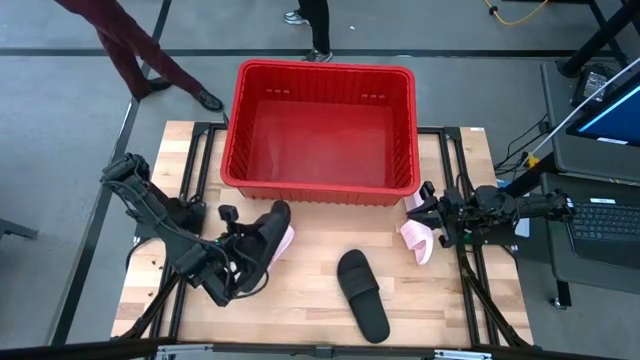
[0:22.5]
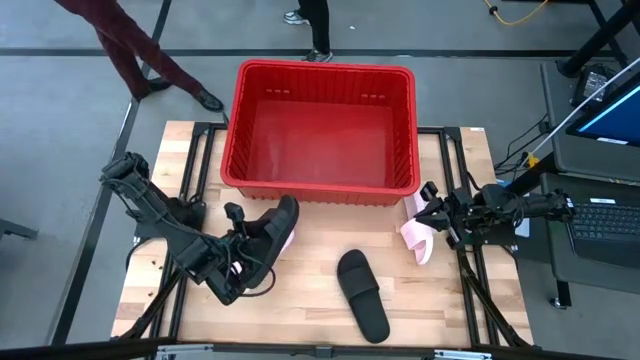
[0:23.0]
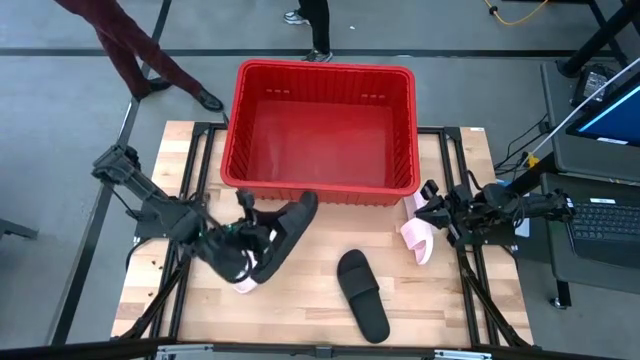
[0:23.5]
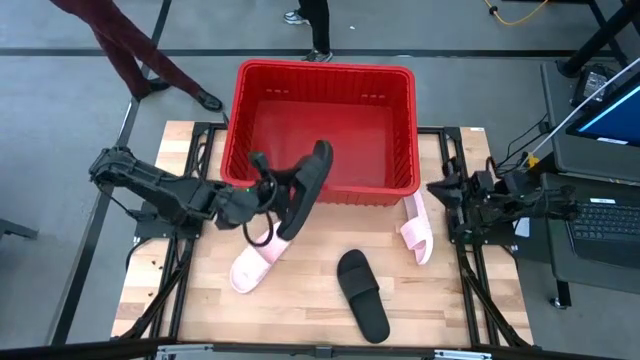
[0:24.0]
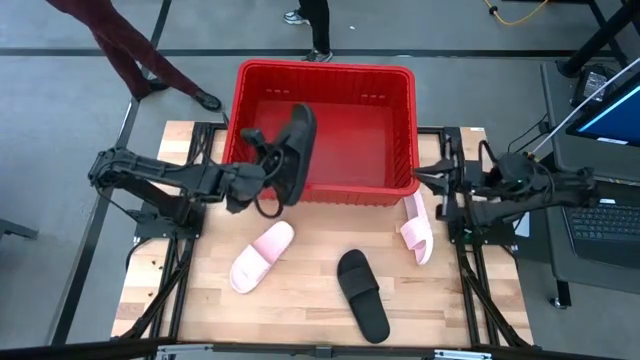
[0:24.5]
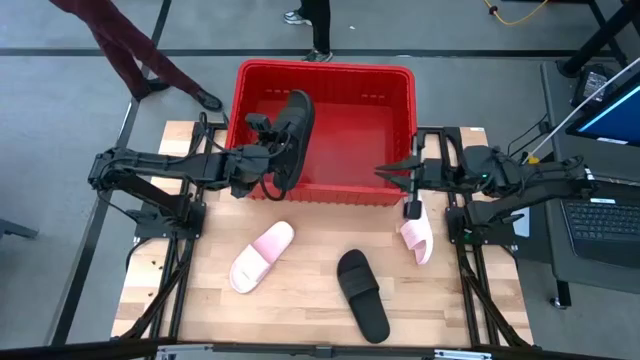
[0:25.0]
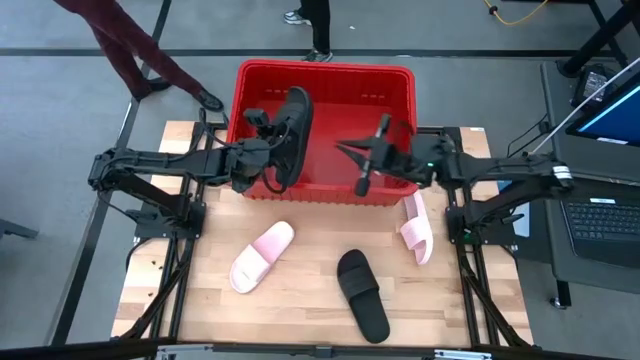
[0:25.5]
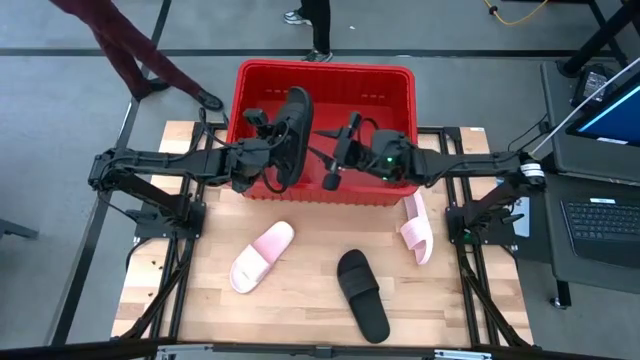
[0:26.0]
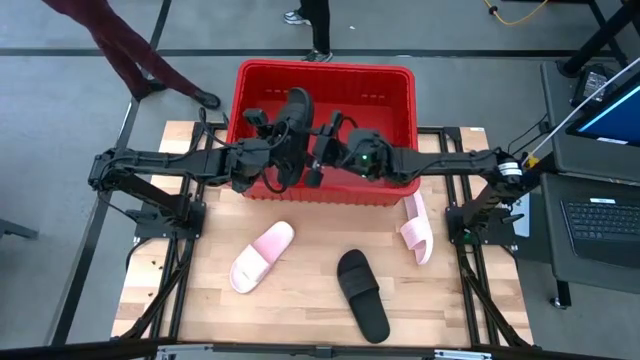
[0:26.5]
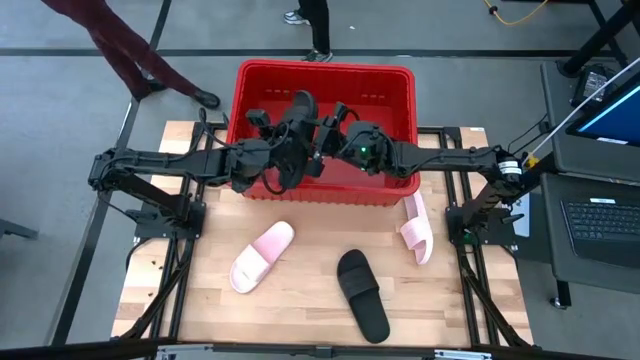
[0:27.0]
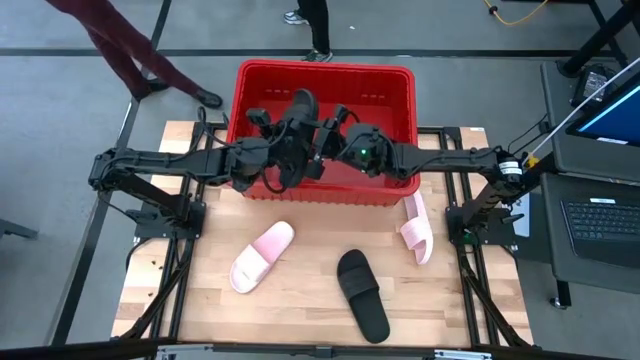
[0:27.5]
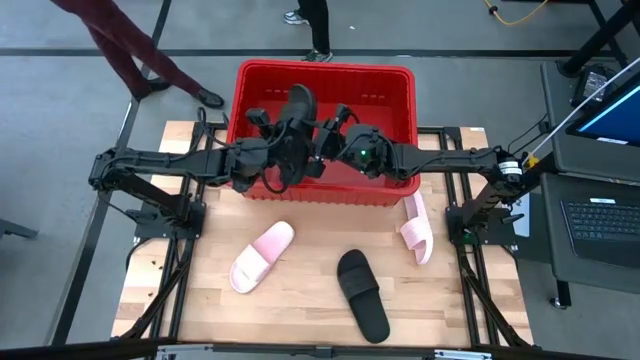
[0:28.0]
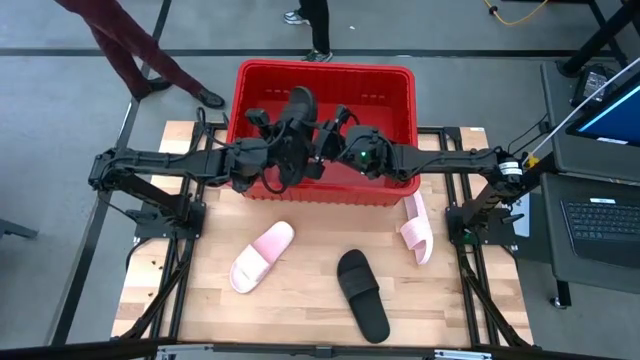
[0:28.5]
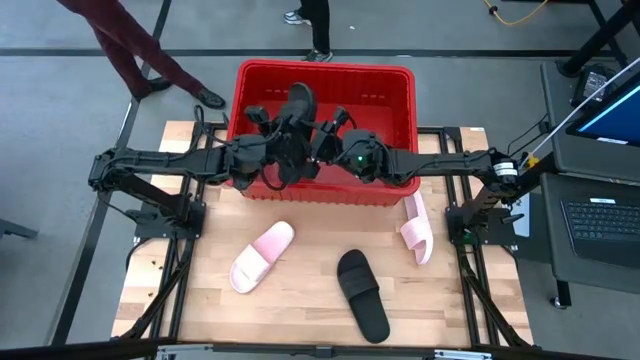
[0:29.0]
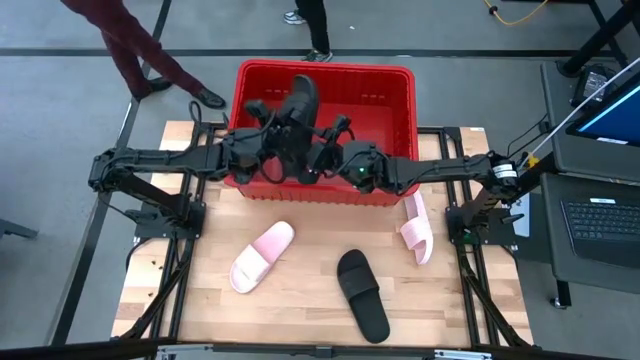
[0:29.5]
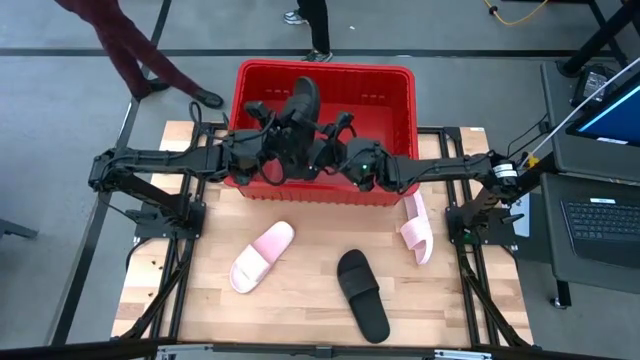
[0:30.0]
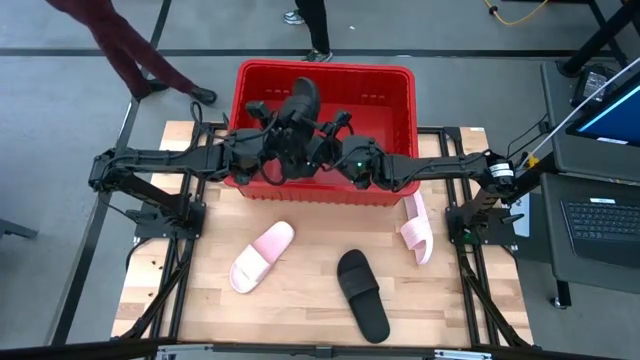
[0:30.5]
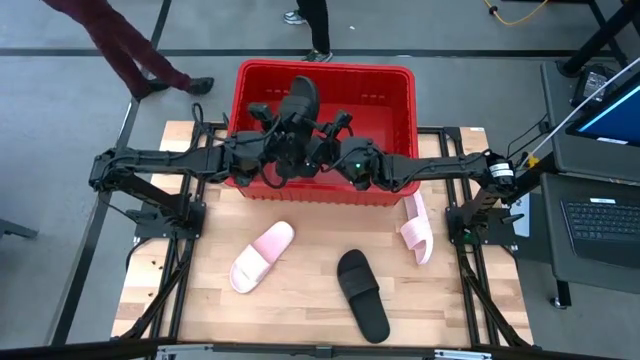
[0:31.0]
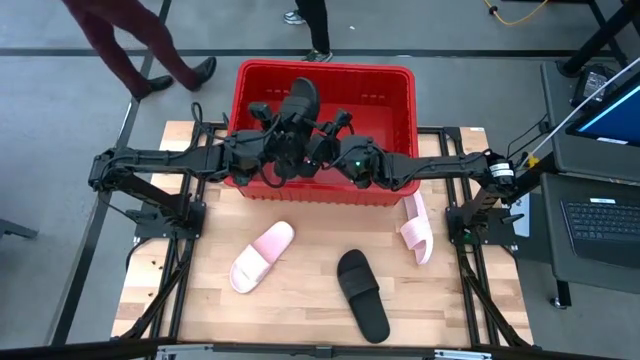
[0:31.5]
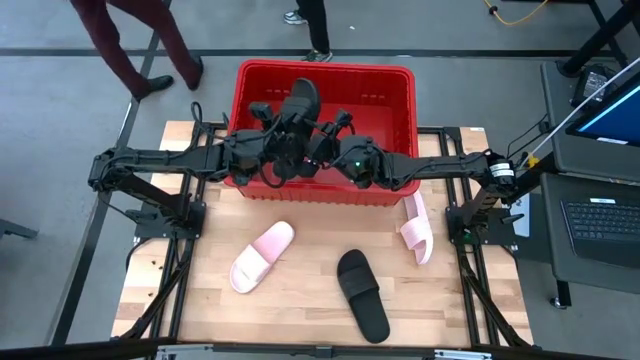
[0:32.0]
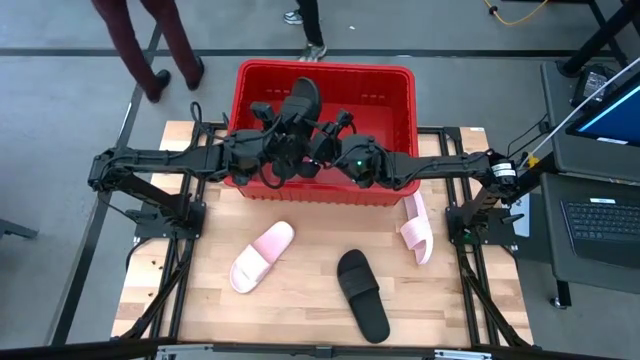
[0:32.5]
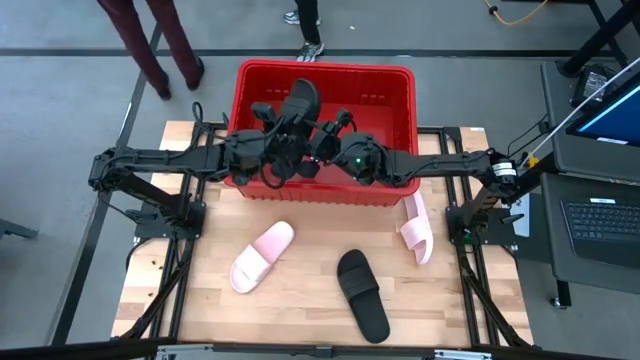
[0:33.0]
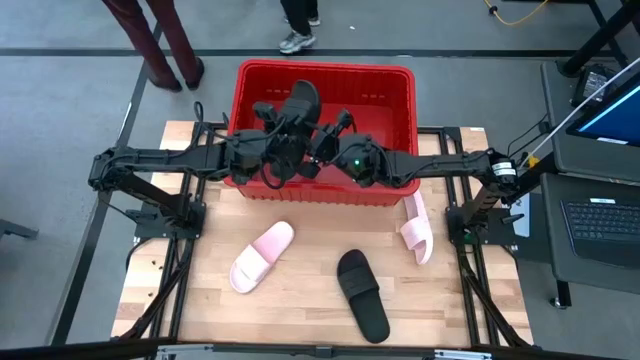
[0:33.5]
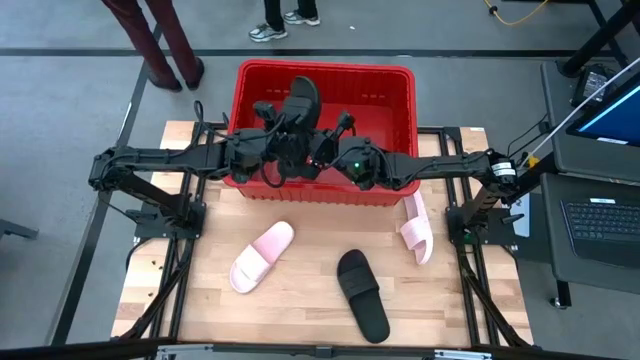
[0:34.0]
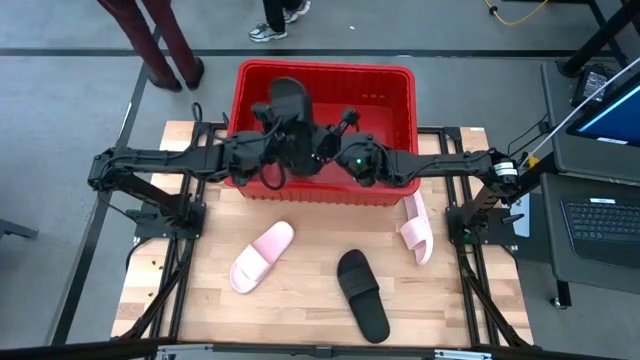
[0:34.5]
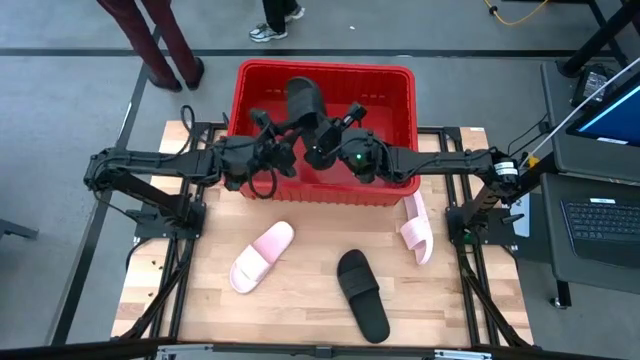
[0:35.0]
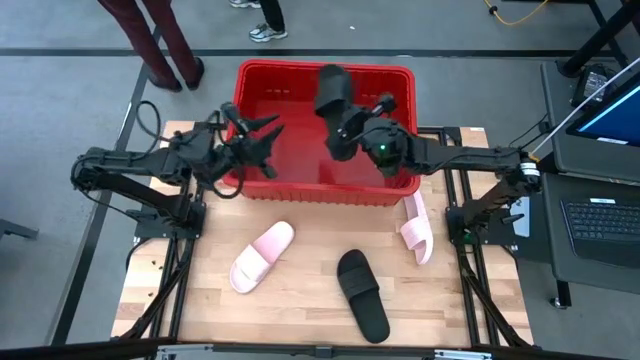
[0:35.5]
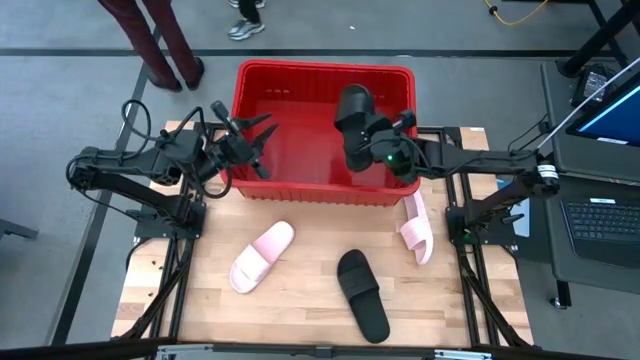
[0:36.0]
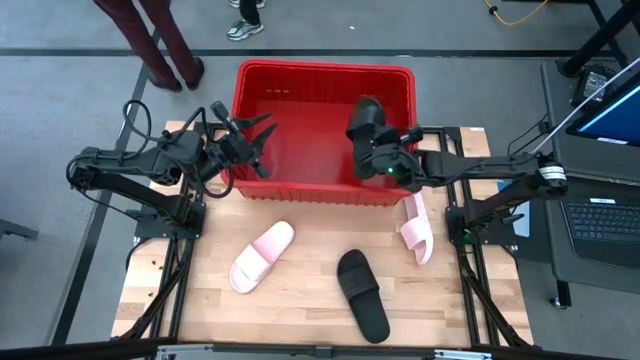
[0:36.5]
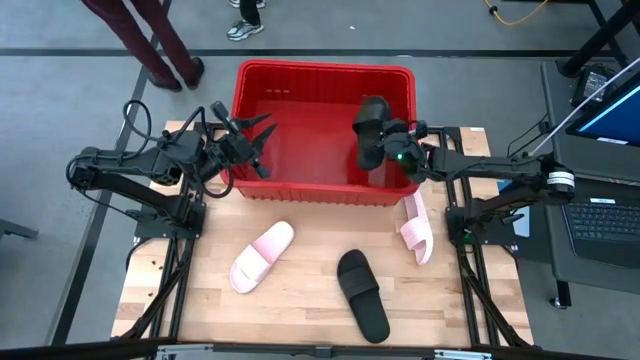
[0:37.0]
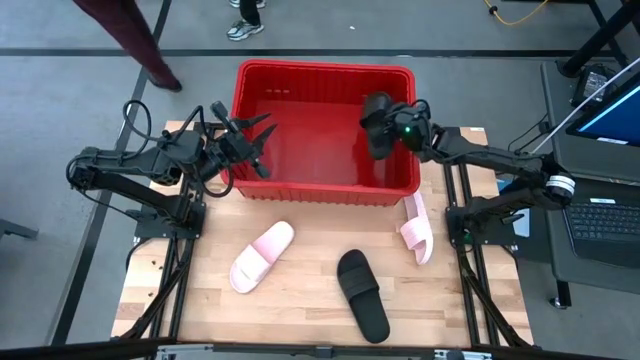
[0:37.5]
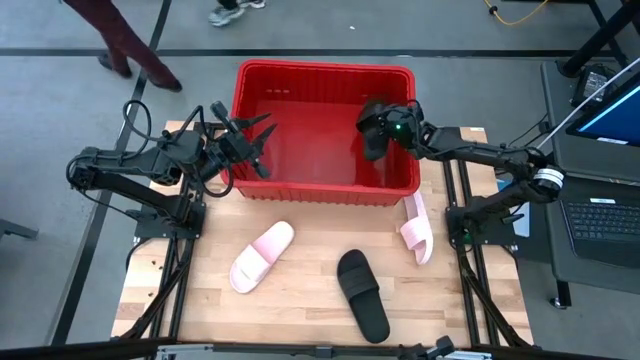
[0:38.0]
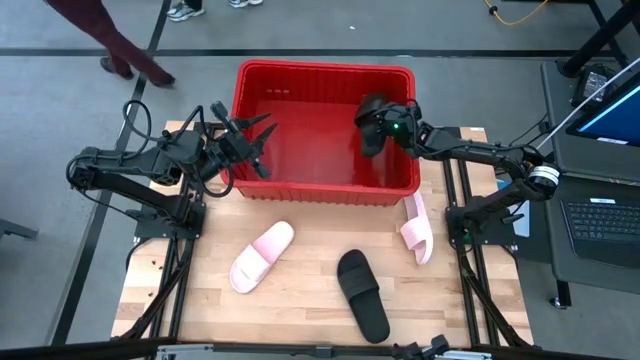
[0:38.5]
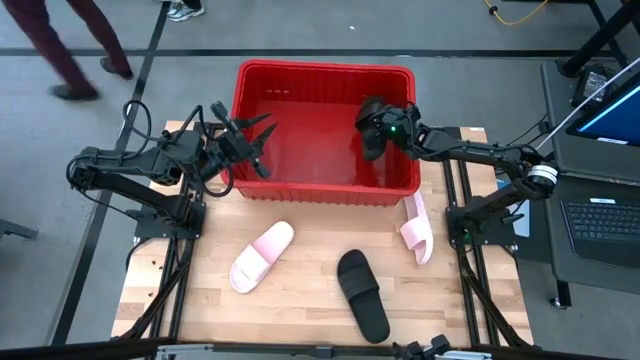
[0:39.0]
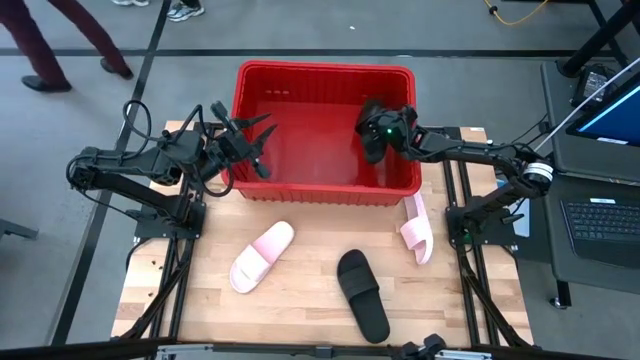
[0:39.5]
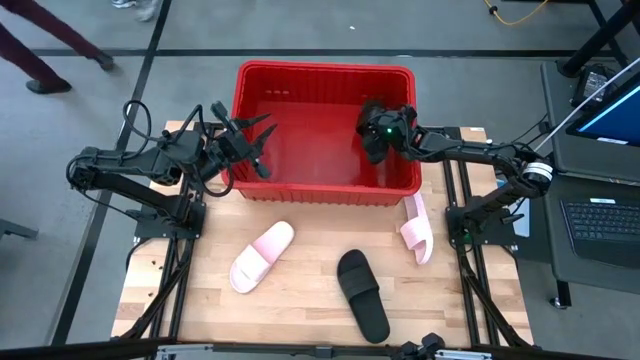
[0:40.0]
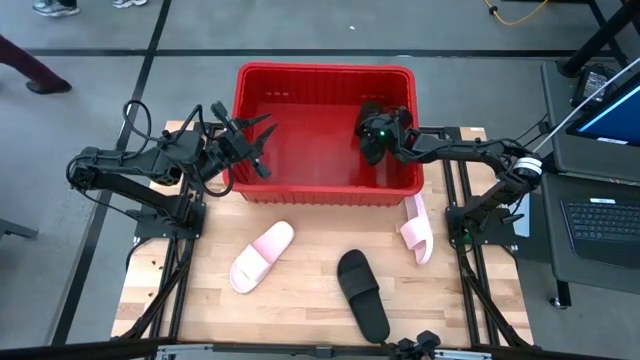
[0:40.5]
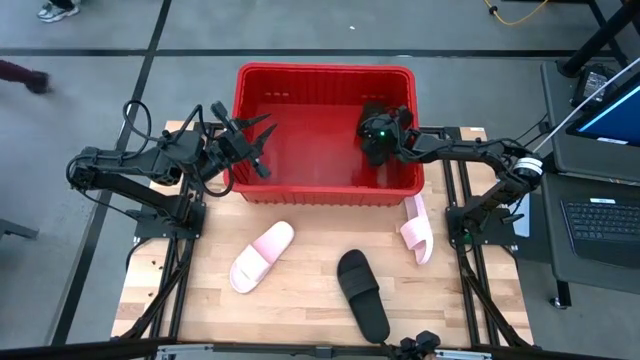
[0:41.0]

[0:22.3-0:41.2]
Task: Pick and place slides into bin
Put the top black slipper into the red bin
